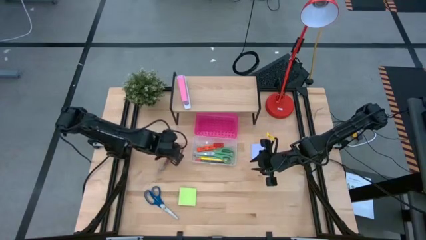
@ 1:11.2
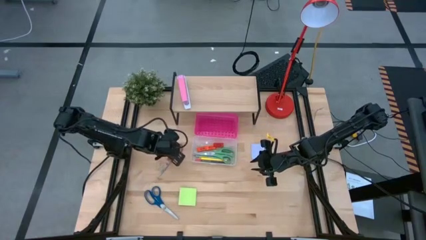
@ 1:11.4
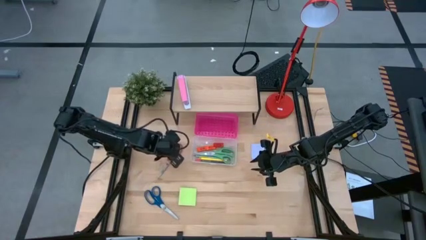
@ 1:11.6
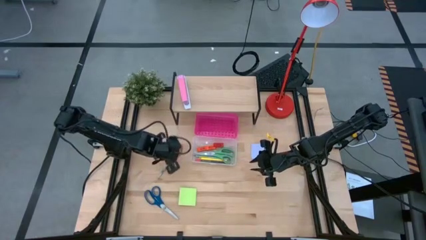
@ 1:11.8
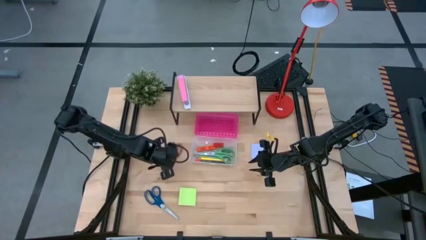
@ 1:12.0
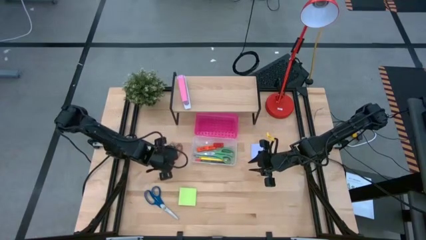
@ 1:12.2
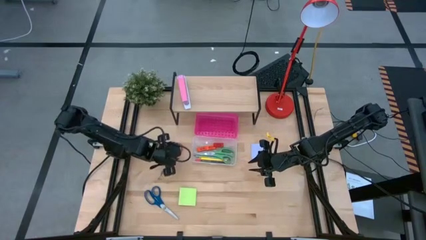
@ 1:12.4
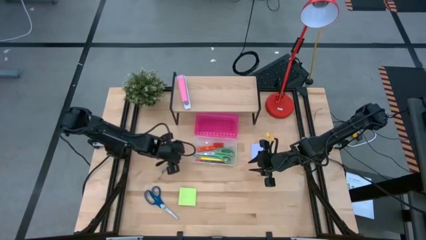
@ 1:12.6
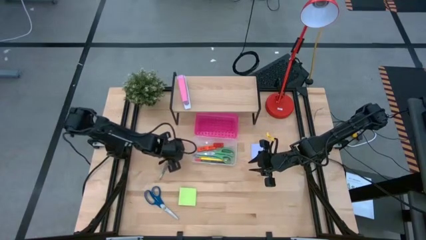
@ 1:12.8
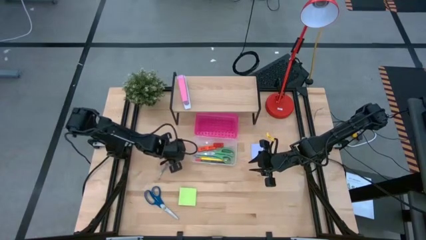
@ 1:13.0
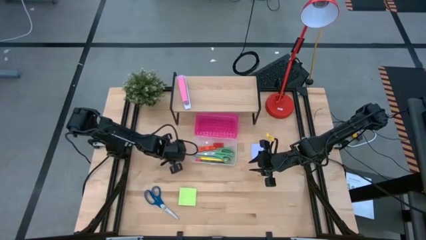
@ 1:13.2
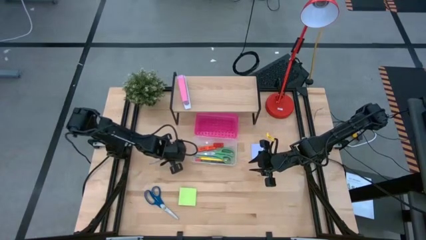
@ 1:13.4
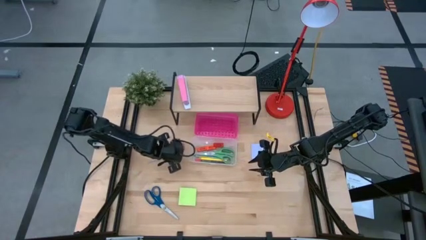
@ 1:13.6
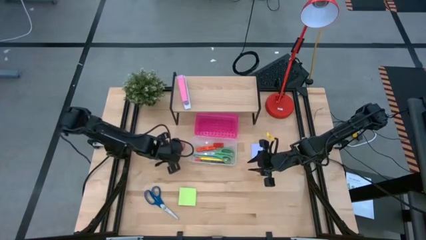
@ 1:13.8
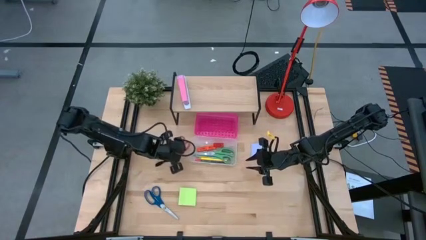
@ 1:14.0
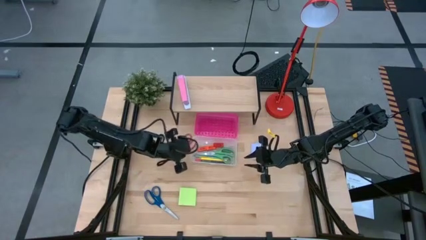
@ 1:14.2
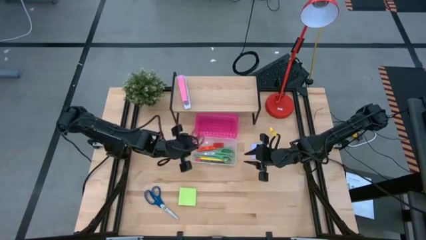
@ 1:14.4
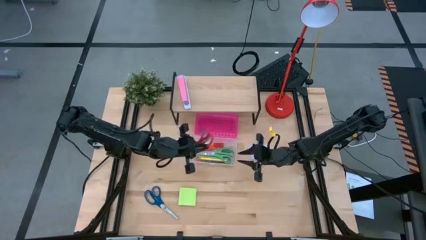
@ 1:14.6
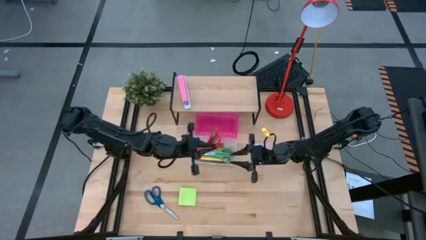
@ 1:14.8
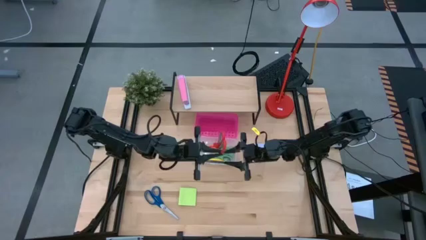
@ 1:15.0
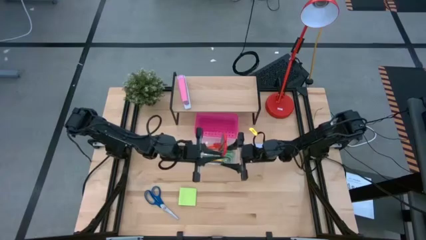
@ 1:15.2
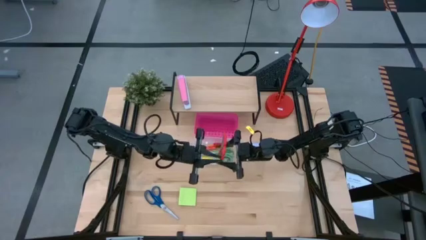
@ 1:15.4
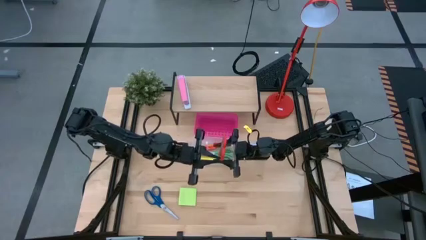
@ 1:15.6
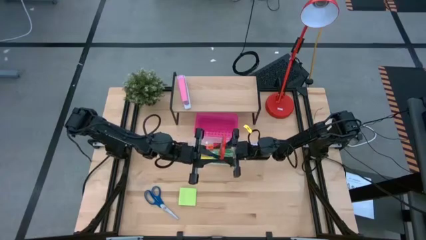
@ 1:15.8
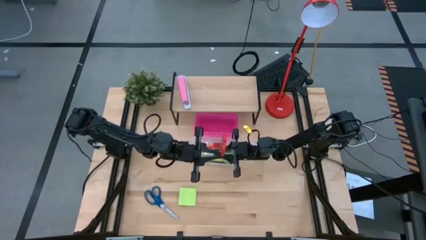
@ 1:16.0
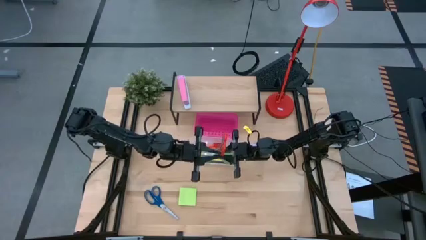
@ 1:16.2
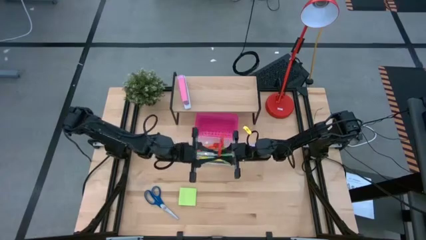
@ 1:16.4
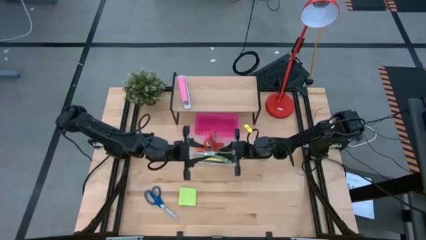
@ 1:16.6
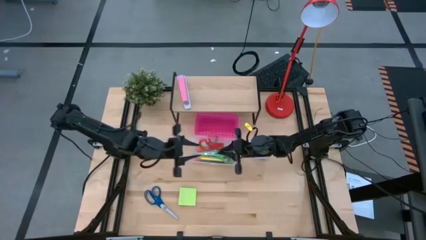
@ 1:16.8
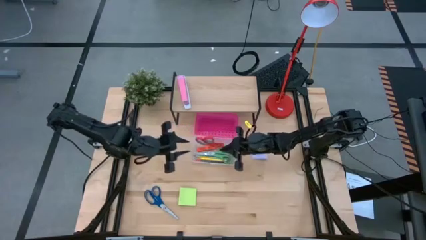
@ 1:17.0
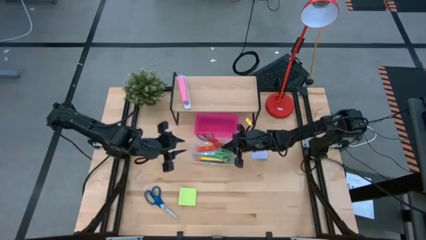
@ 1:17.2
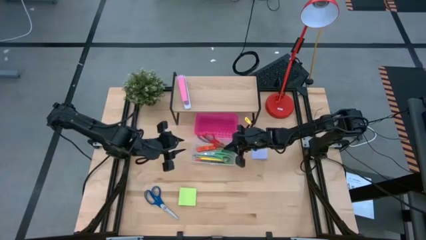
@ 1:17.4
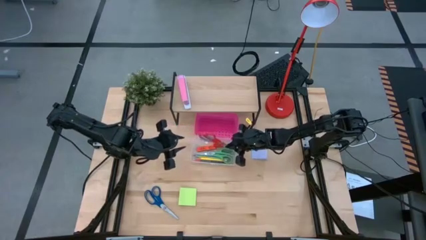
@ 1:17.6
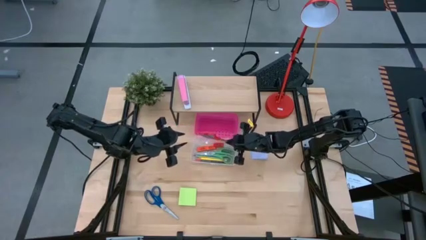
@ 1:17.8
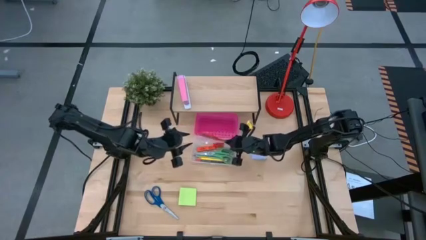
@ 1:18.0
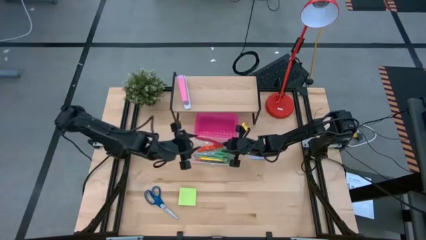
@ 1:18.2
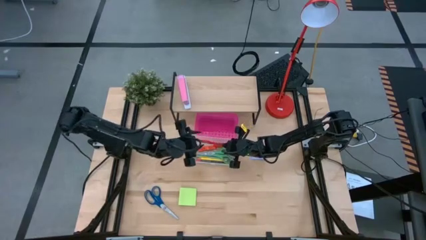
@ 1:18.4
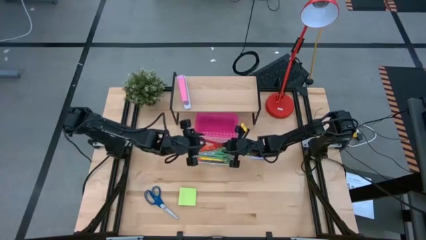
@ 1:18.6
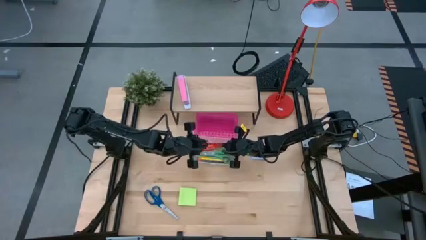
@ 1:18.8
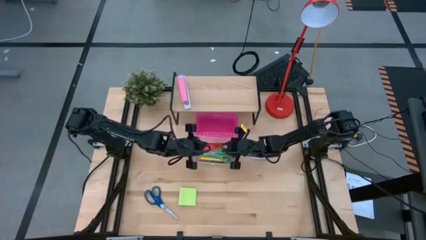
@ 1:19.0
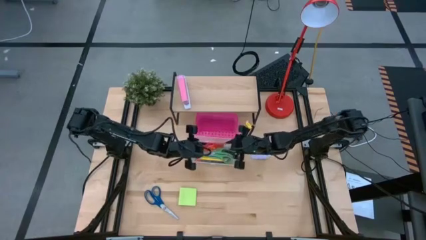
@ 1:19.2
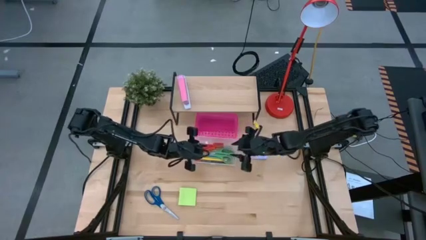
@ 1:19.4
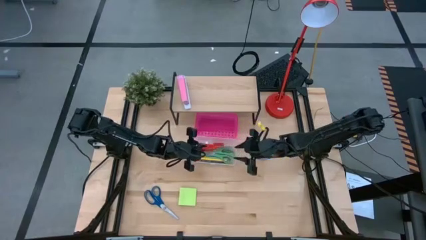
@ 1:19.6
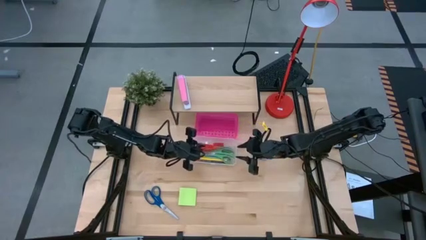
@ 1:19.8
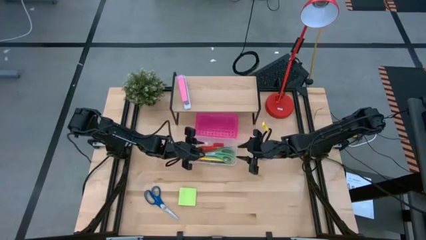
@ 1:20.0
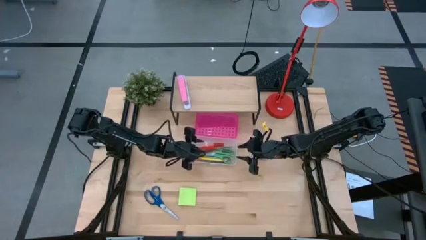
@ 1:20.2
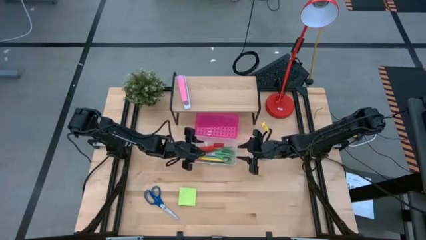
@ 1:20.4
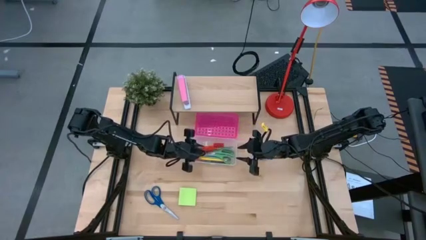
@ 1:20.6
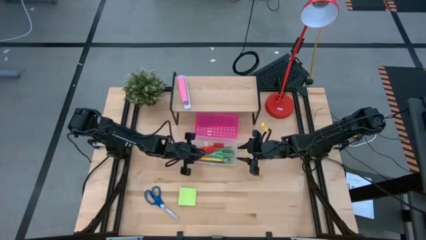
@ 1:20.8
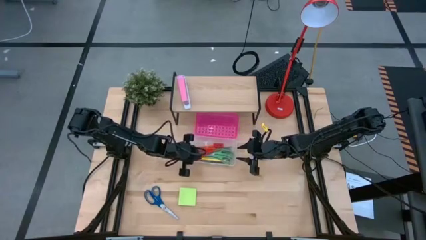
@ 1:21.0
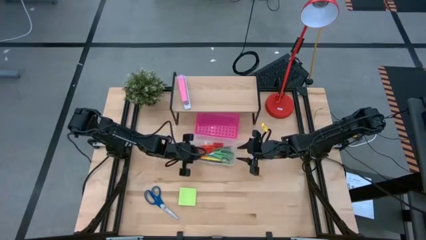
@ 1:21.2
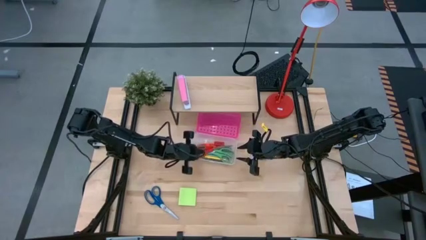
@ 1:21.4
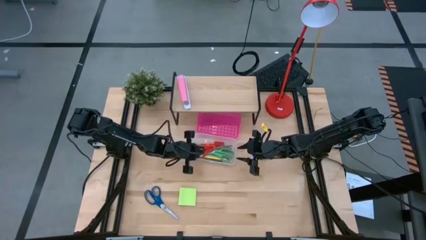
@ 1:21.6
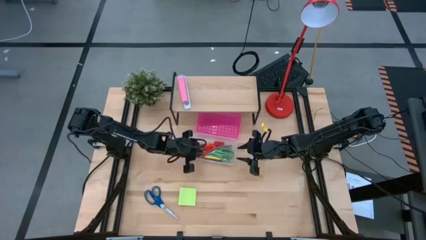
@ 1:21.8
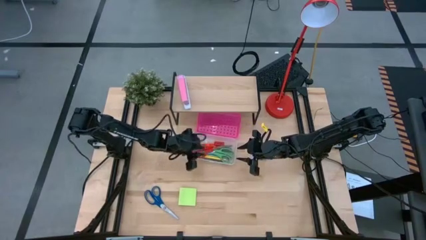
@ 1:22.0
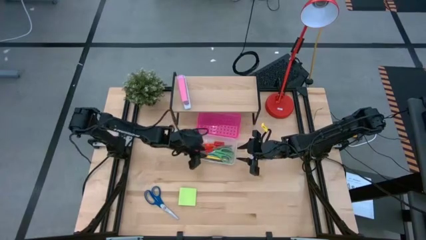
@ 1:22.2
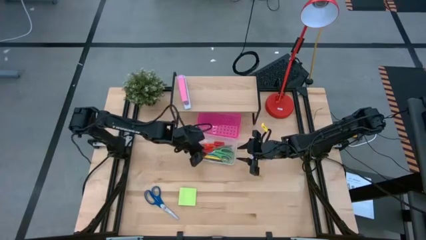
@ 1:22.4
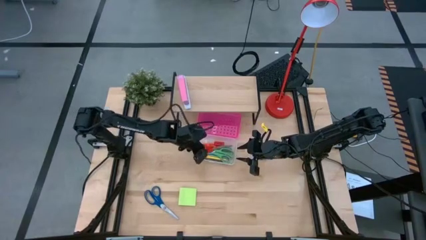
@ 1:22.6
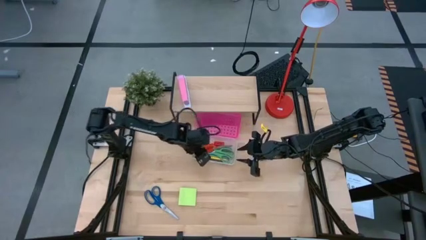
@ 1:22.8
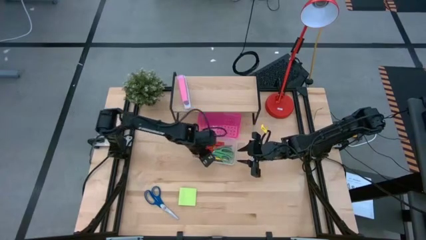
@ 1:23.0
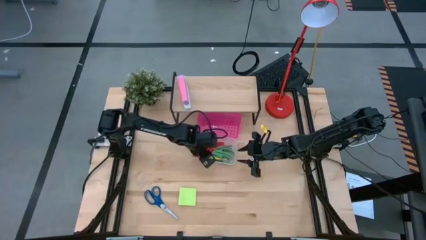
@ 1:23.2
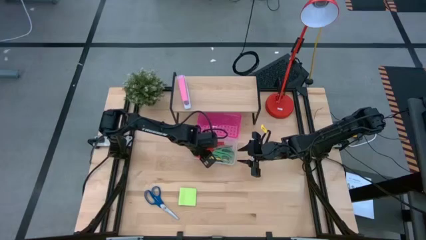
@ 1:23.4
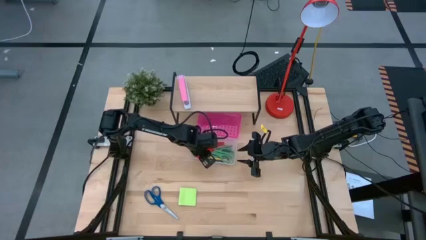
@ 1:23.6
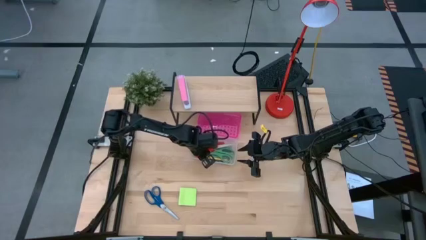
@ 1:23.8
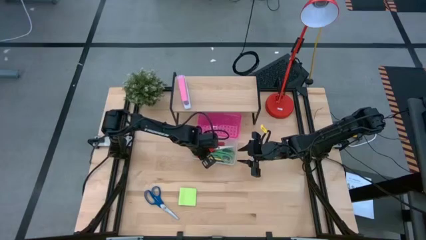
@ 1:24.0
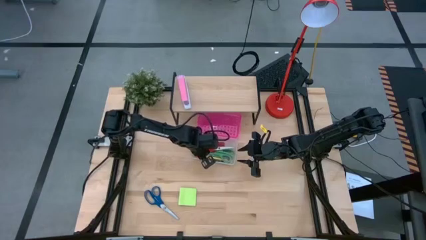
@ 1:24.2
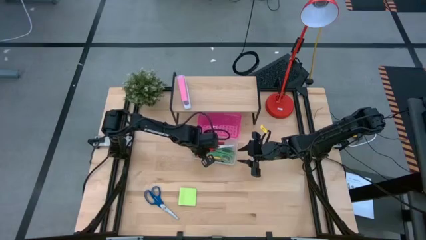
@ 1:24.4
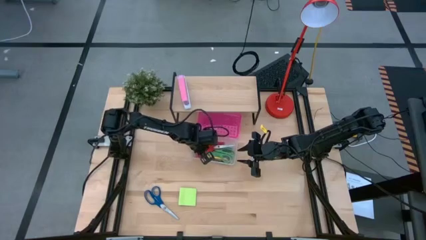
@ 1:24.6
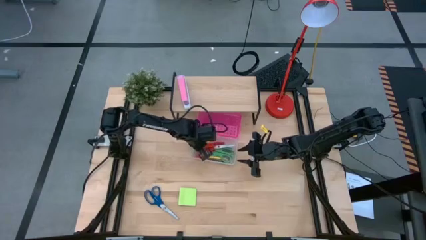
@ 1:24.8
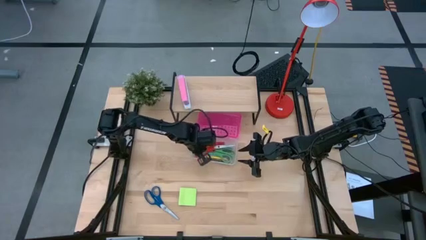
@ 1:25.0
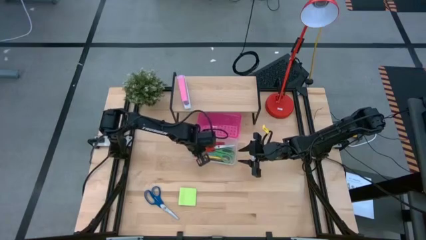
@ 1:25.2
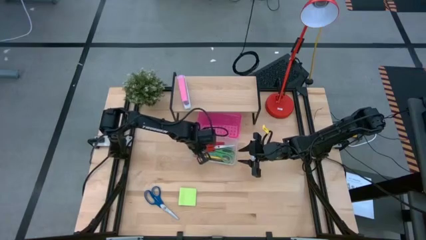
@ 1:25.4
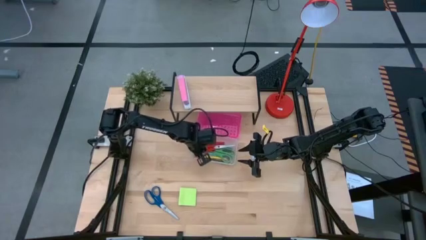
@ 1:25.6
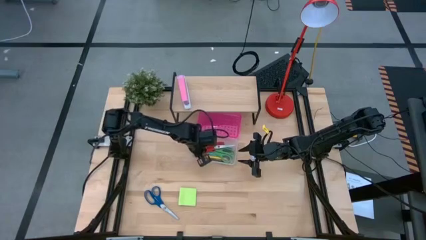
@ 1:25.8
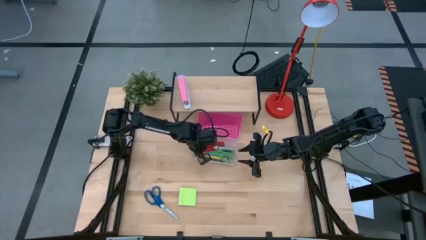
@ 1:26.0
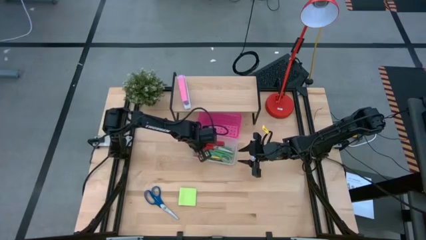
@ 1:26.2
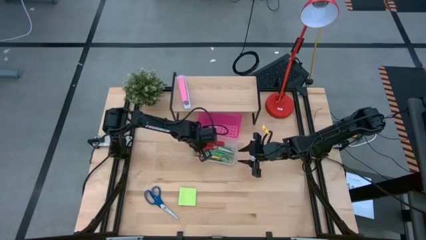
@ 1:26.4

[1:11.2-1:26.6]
Task: Pack school essentials
Put the red scissors into the supply box
